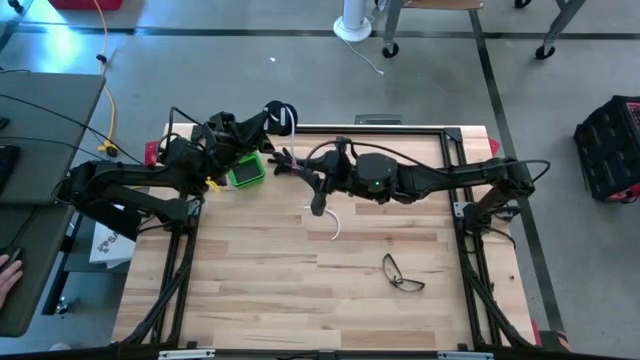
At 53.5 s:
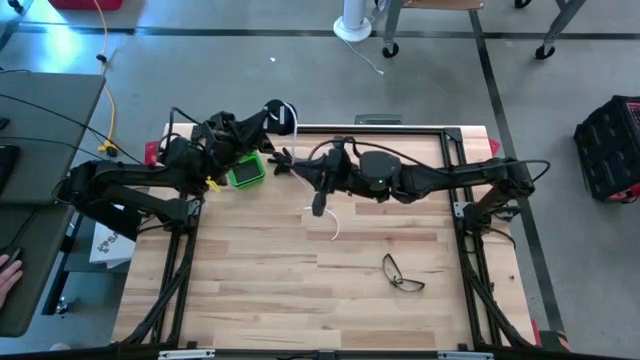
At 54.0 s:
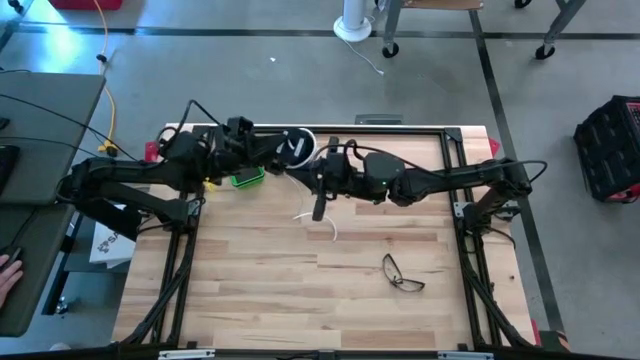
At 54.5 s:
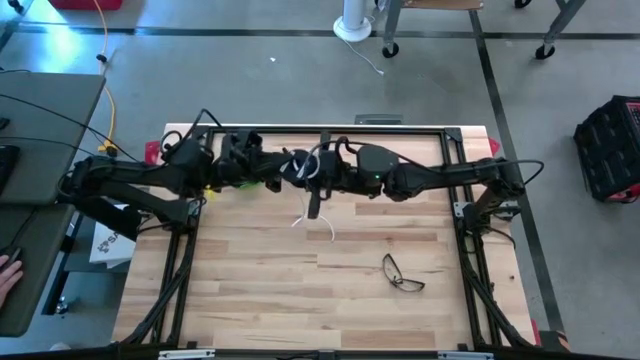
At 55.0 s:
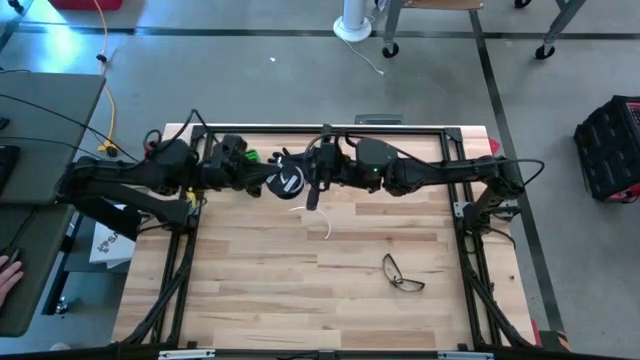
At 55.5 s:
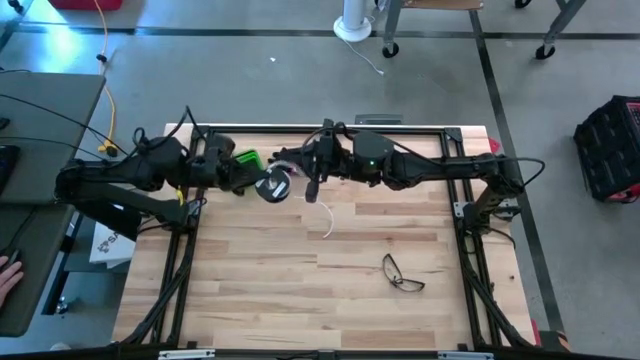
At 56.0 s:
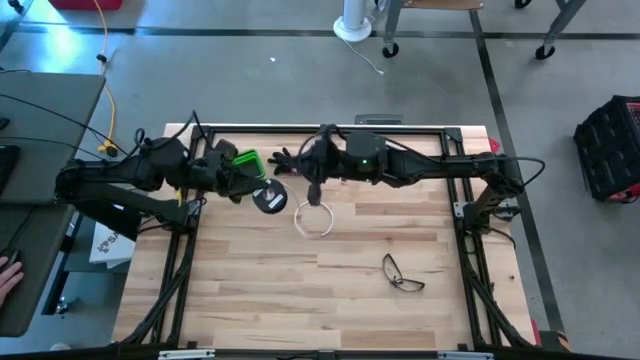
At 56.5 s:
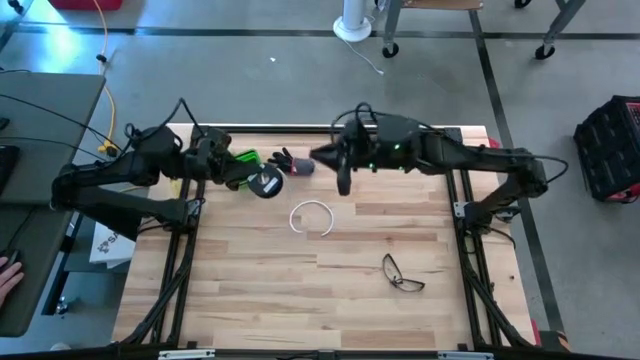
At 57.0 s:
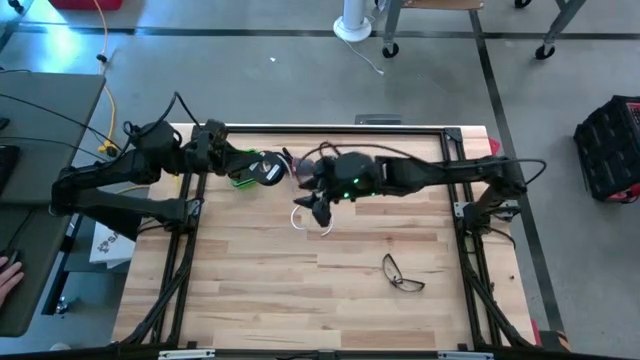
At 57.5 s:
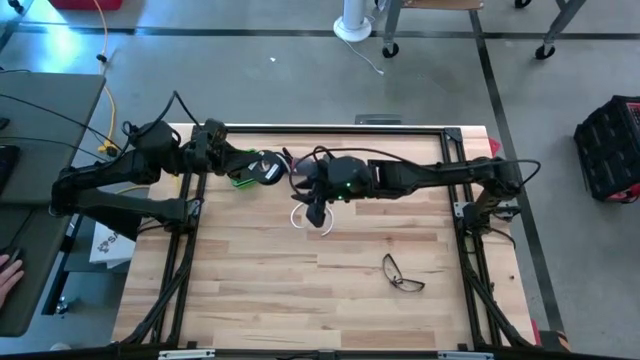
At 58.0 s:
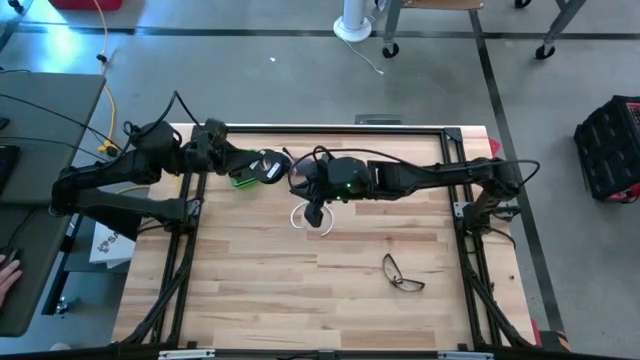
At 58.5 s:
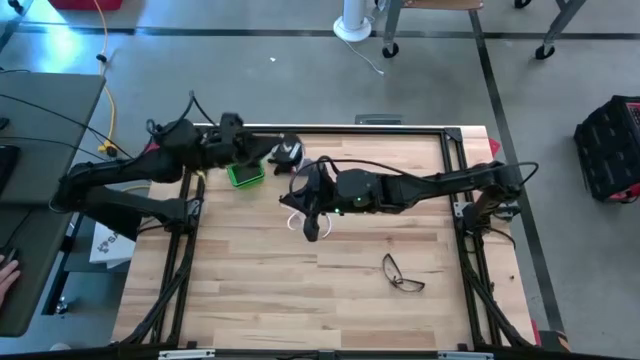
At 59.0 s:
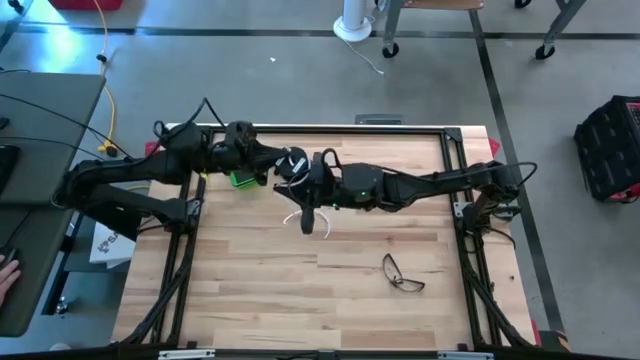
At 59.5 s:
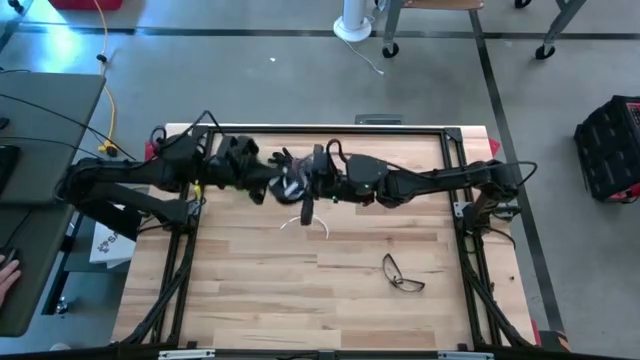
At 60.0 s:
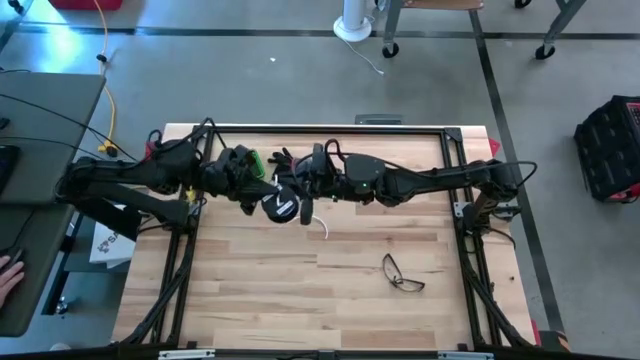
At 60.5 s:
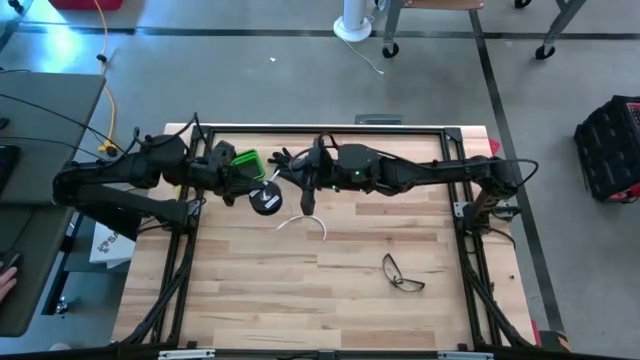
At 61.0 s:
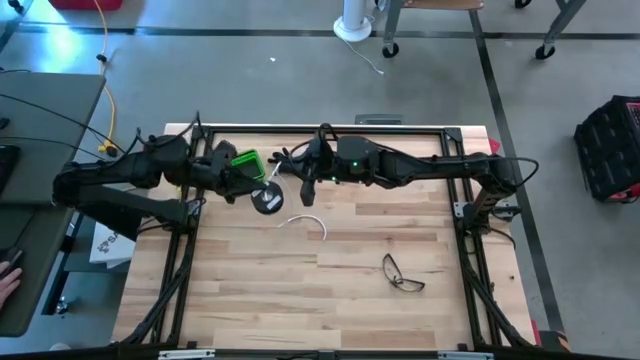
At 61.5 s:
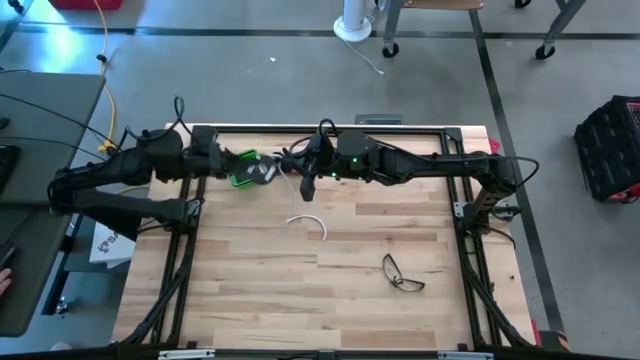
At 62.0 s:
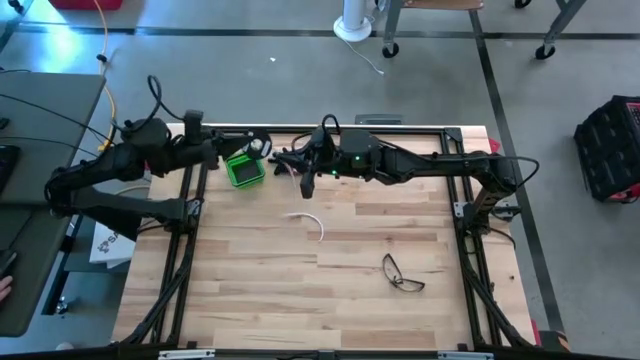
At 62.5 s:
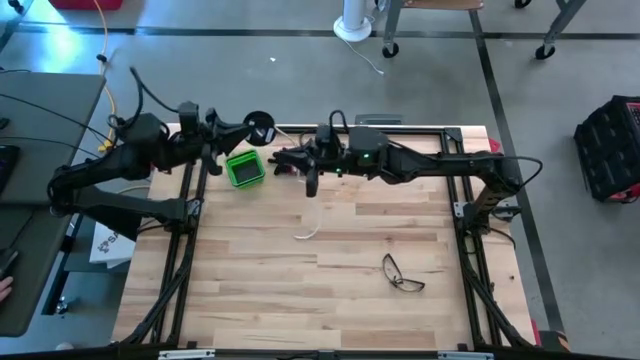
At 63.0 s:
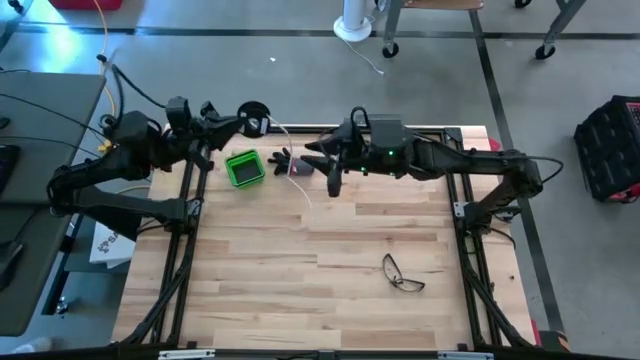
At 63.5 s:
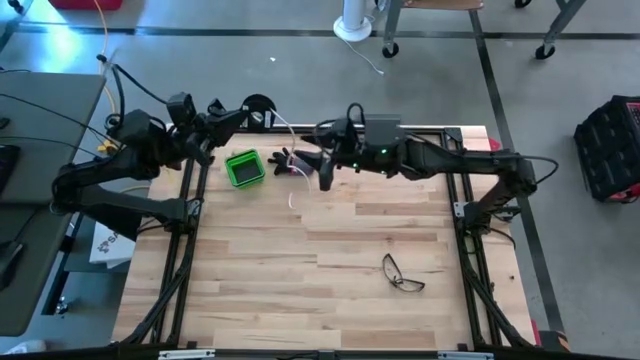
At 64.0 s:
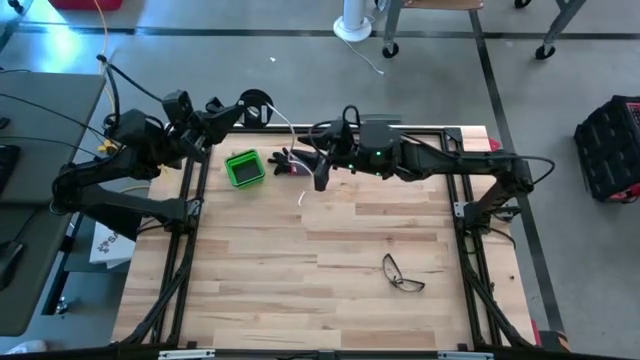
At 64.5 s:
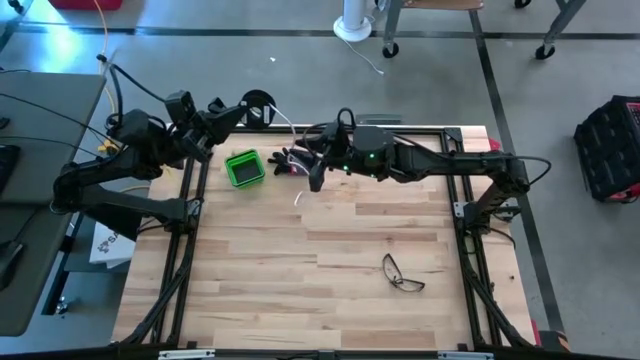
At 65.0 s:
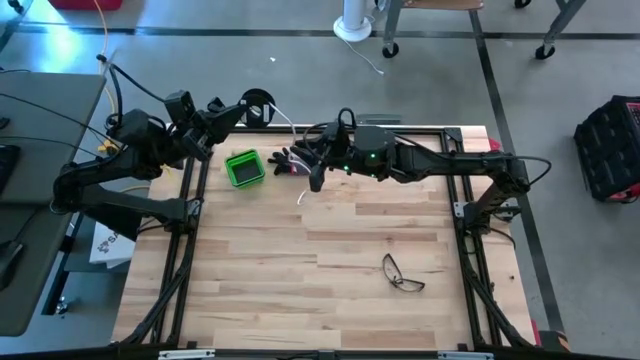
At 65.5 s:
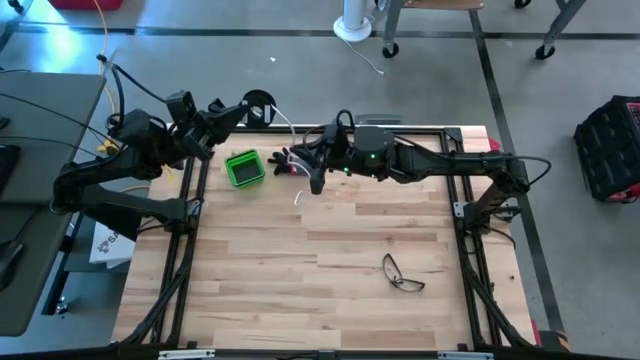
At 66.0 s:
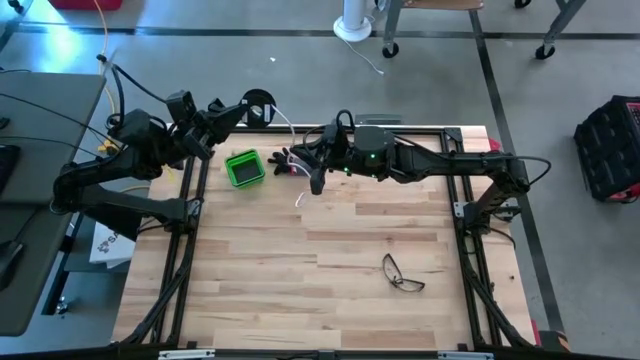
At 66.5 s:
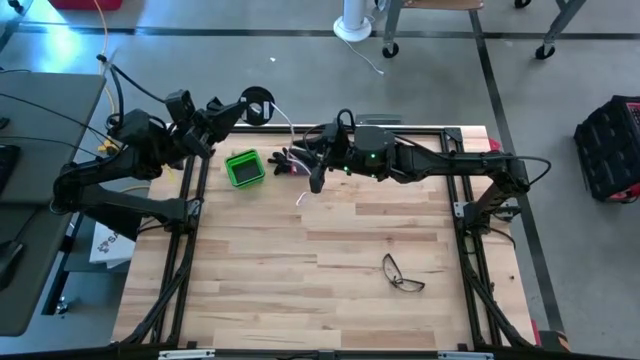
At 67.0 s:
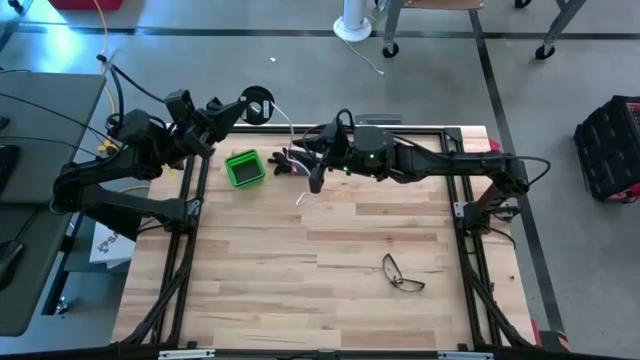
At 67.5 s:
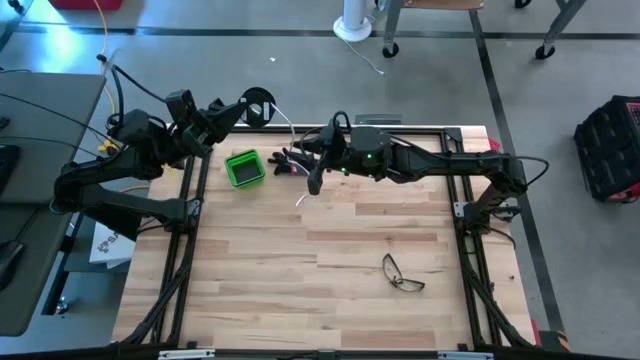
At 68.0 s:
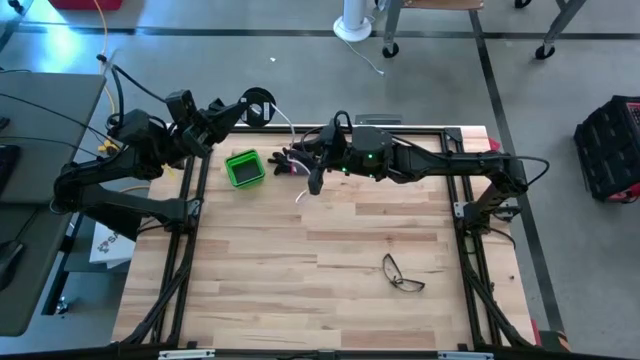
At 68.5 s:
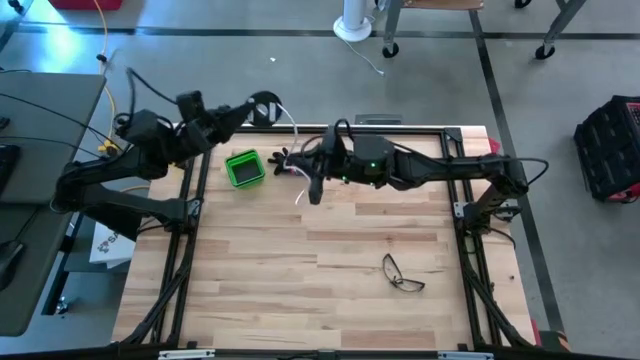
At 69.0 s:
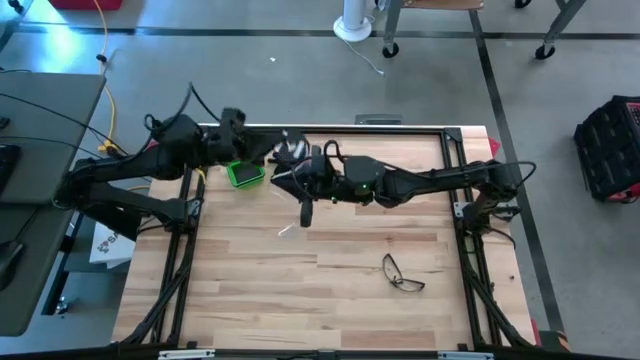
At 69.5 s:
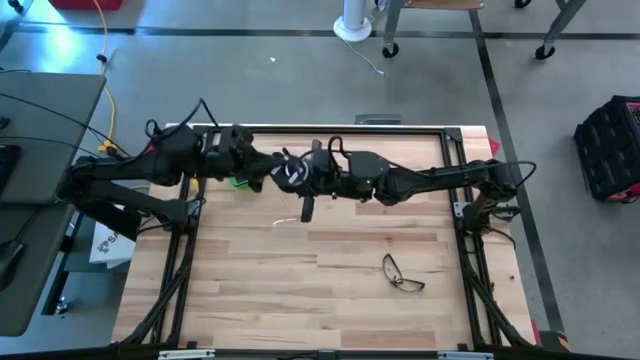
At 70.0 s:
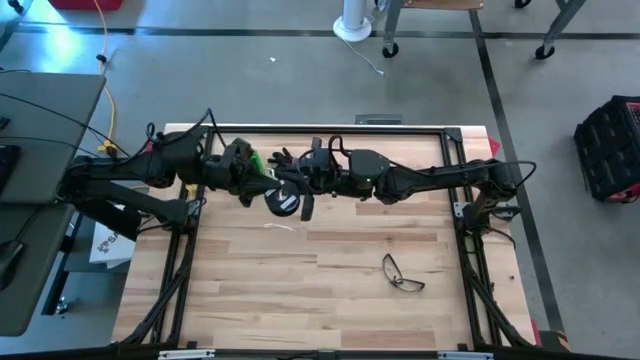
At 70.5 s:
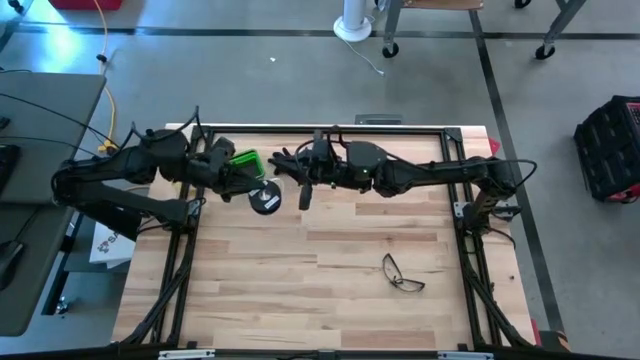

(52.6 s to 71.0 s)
Task: Coil cords
Coil the white wire on the spool

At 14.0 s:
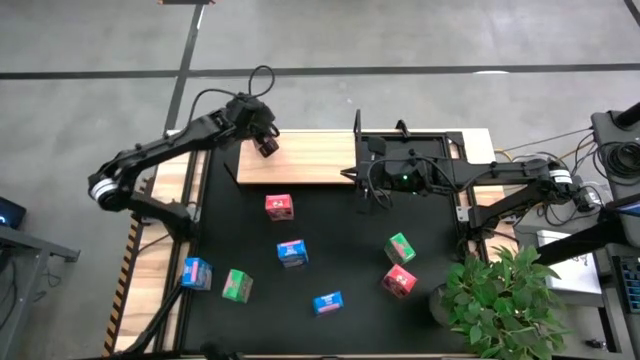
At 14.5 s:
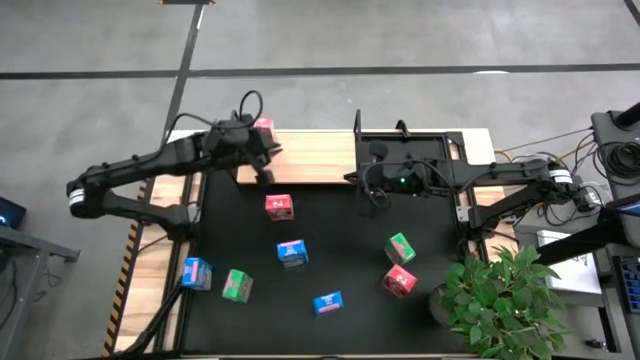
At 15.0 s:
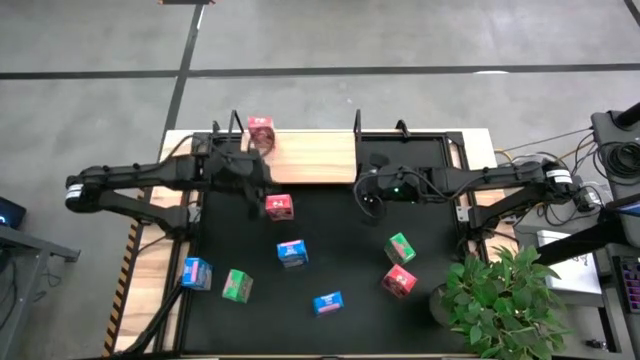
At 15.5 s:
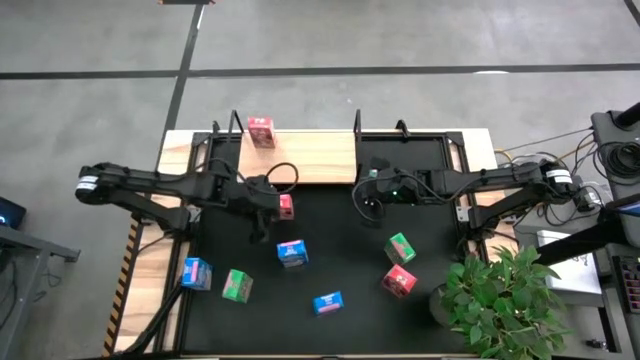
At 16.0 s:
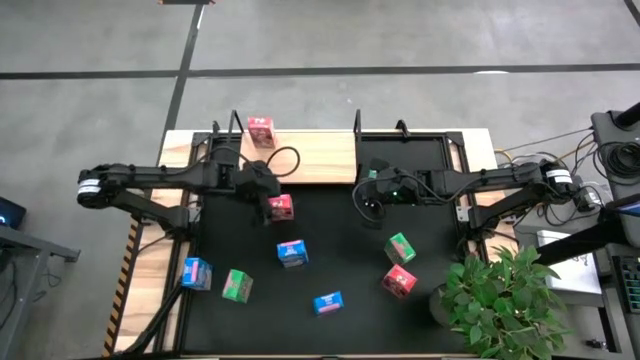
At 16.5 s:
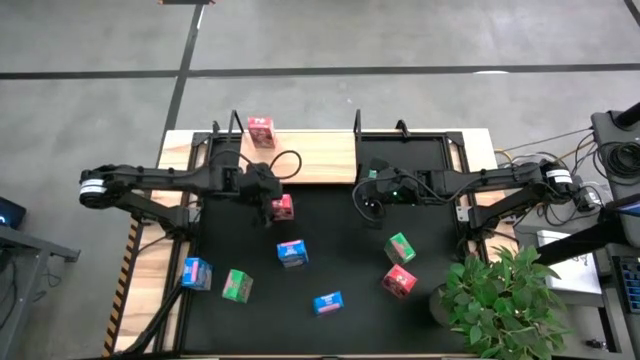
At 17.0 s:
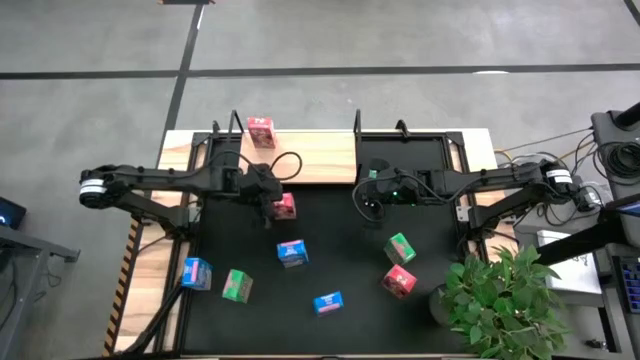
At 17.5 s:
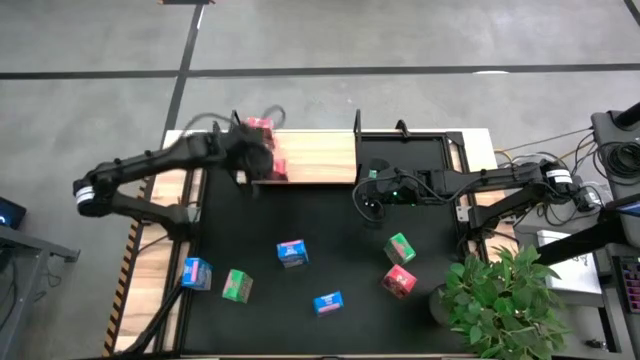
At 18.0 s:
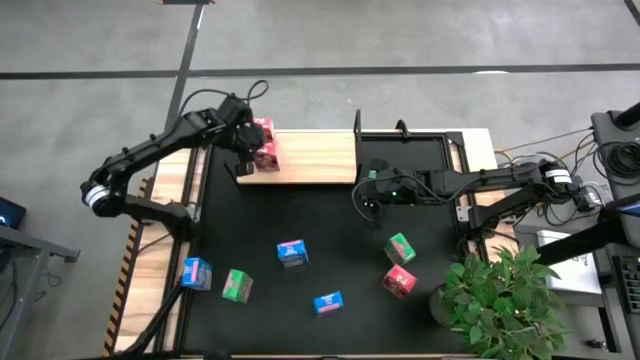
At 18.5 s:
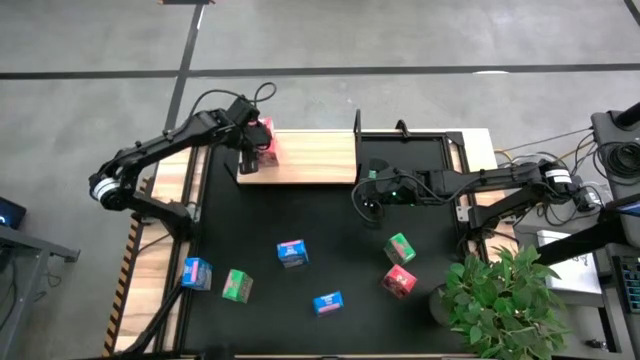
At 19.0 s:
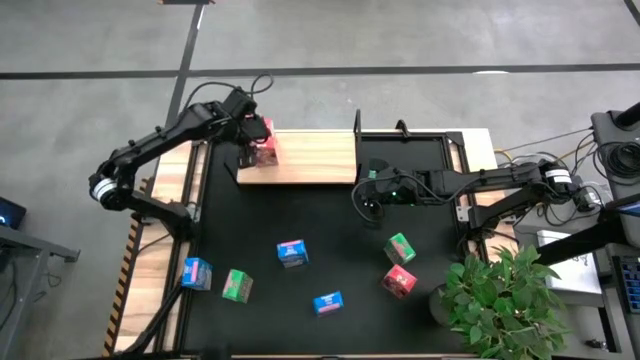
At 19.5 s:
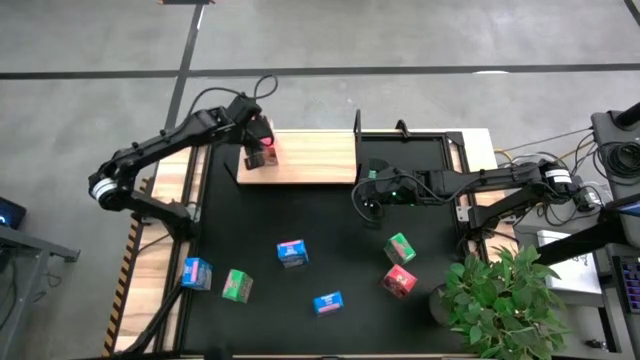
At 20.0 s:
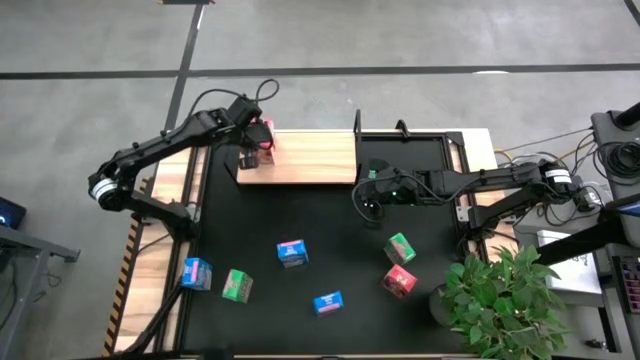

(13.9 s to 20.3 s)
Task: Stack cereal on shelf
Put the top red cereal box on the shelf aligned with the other red cereal box
